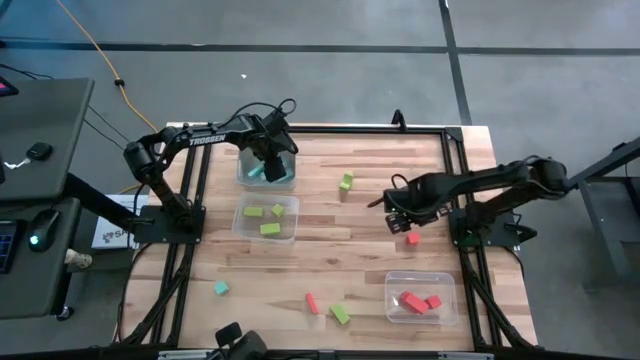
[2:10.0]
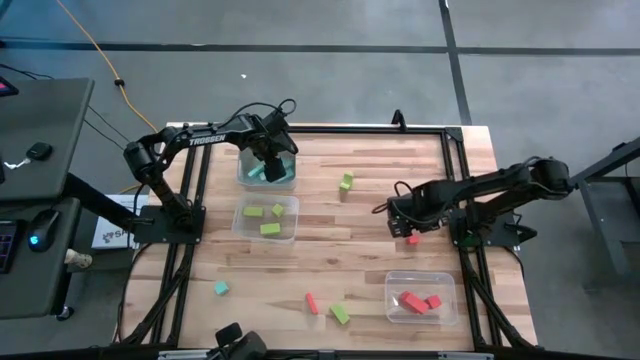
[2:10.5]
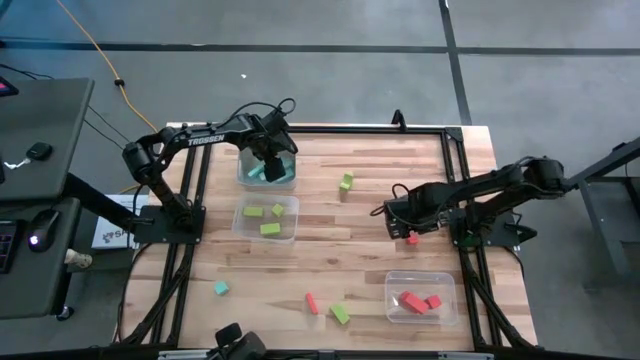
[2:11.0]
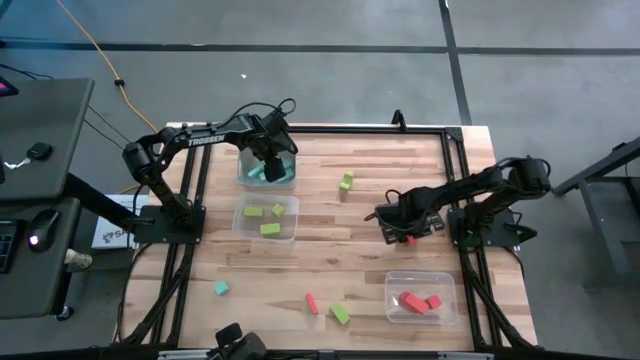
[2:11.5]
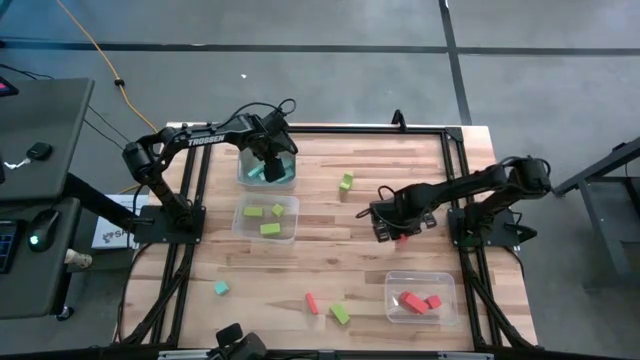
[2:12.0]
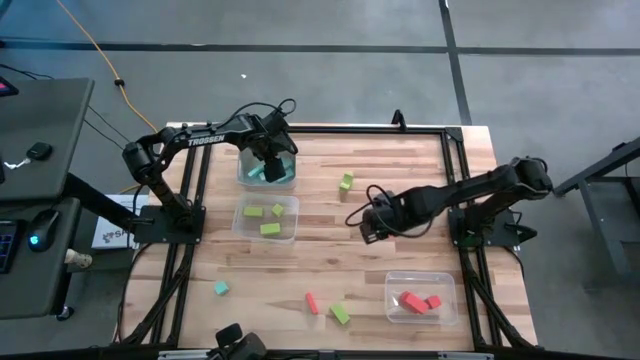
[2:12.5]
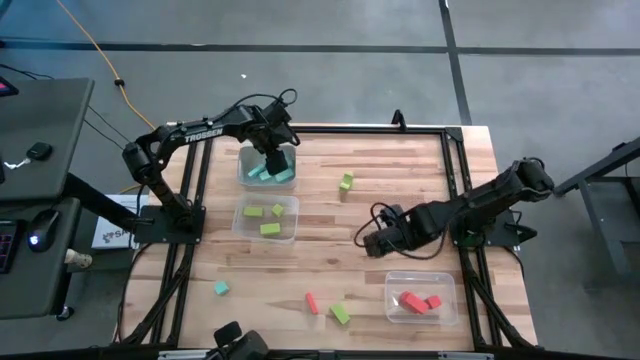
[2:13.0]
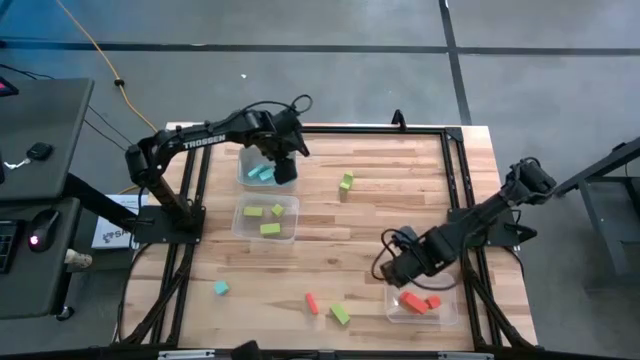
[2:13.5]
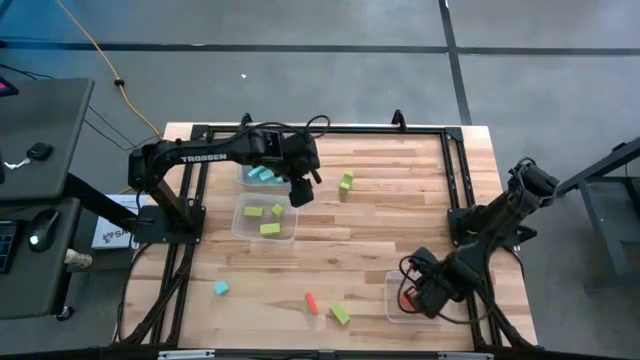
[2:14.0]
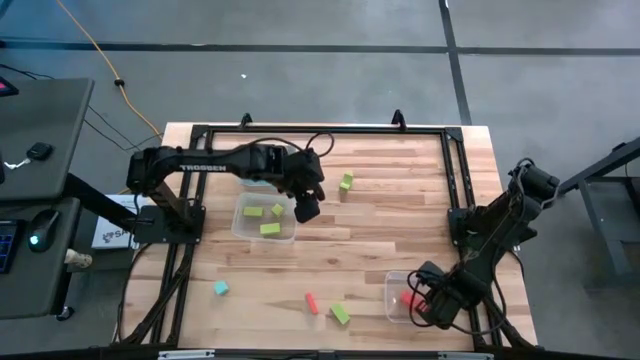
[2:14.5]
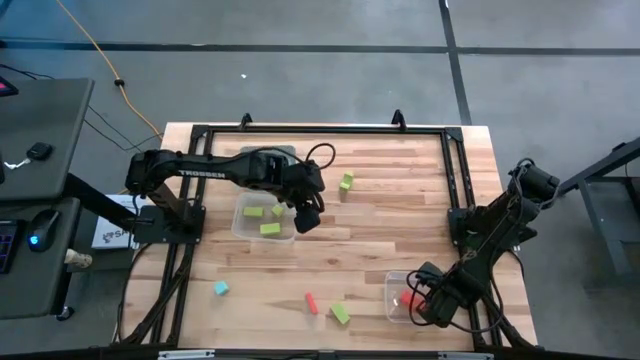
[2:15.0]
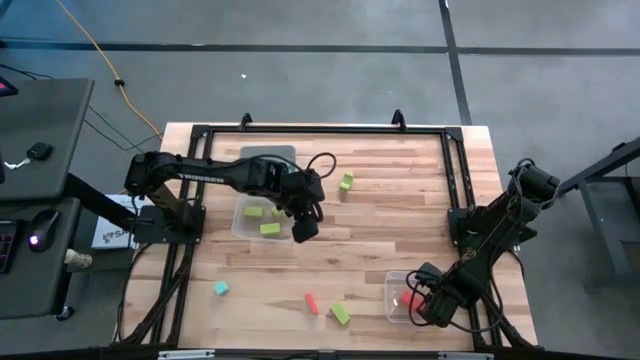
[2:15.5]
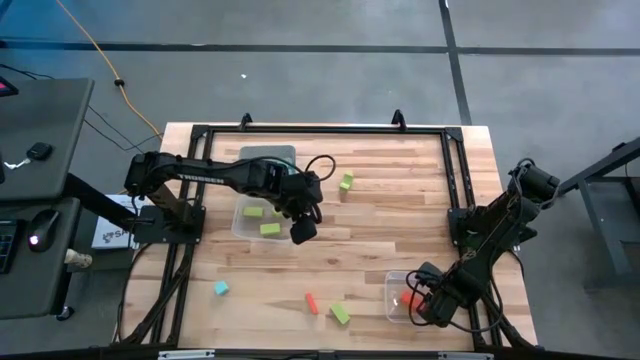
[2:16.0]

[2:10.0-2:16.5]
Task: Sort & place blocks by color
Put the orange block into the right transparent bin

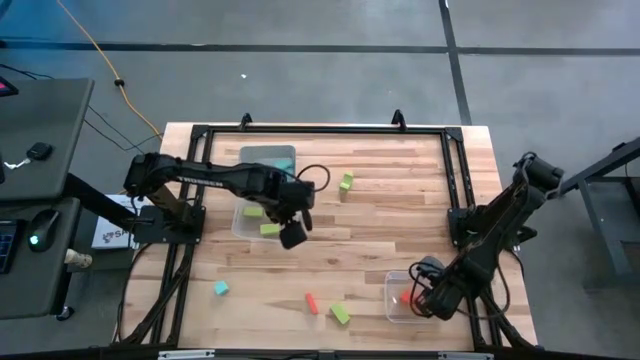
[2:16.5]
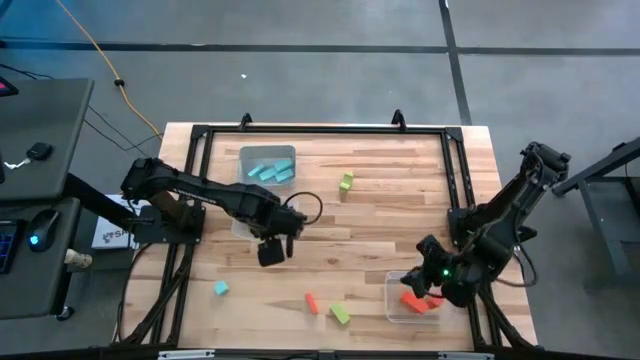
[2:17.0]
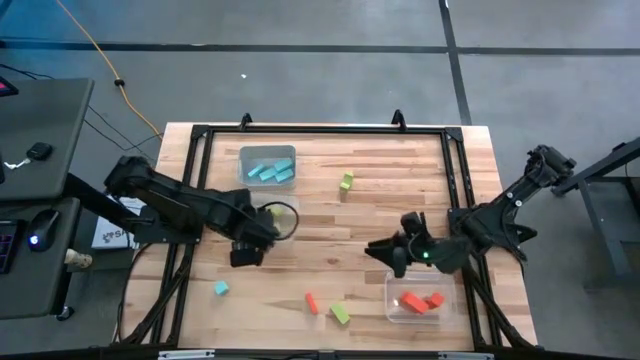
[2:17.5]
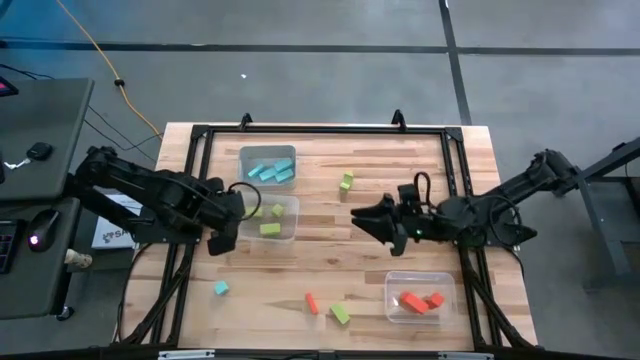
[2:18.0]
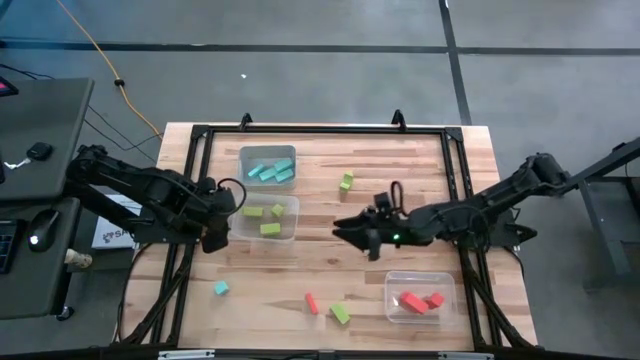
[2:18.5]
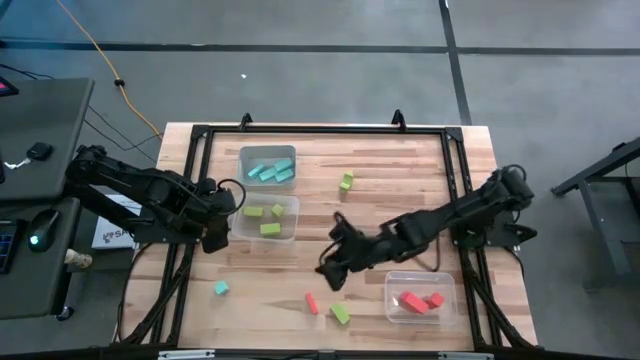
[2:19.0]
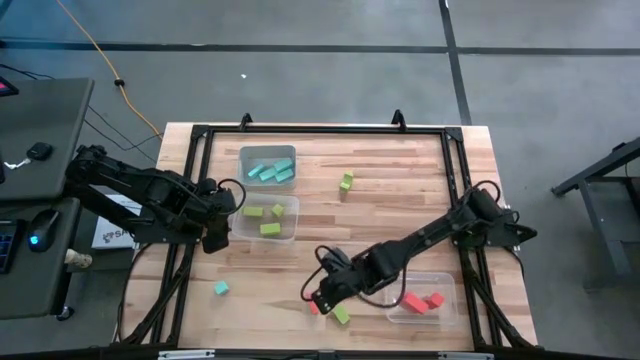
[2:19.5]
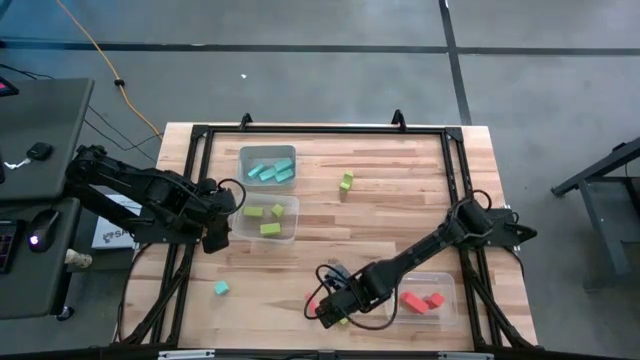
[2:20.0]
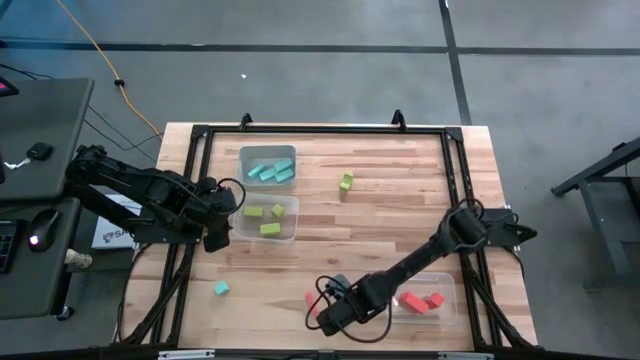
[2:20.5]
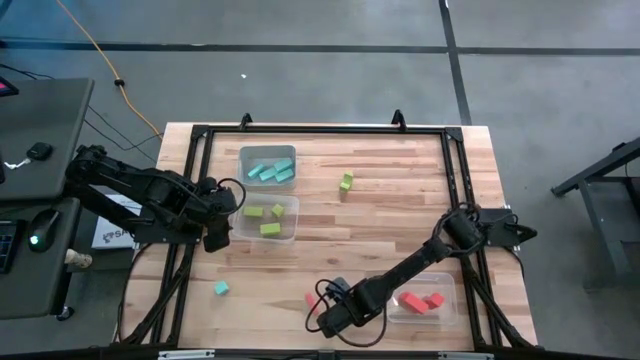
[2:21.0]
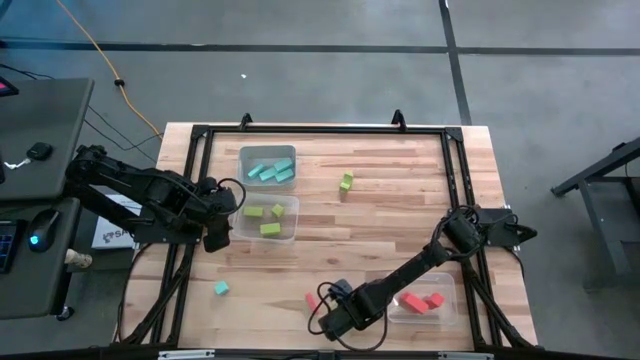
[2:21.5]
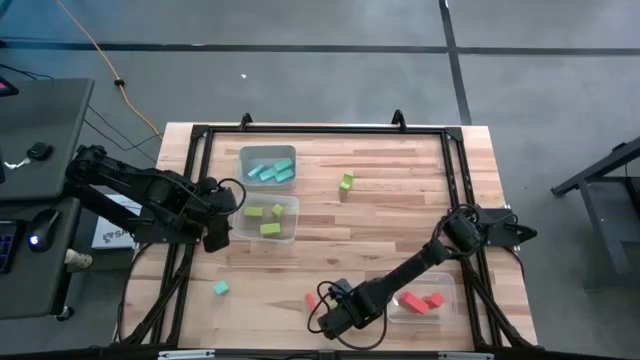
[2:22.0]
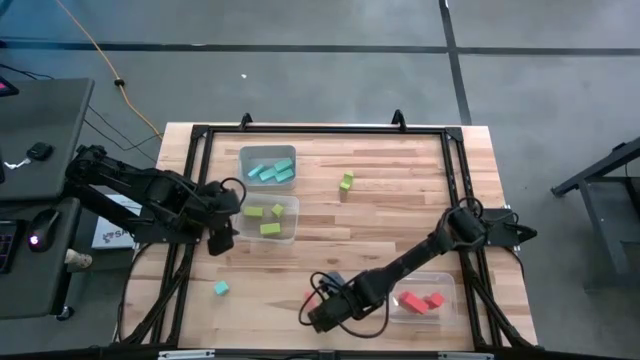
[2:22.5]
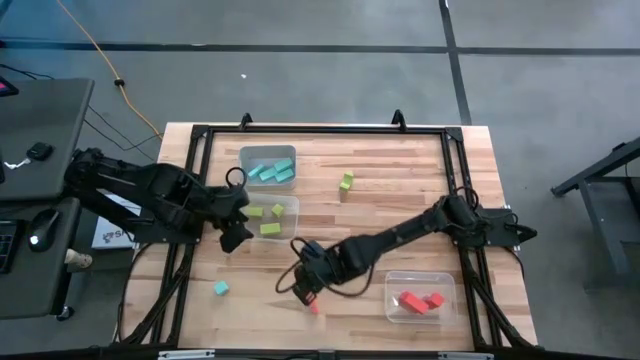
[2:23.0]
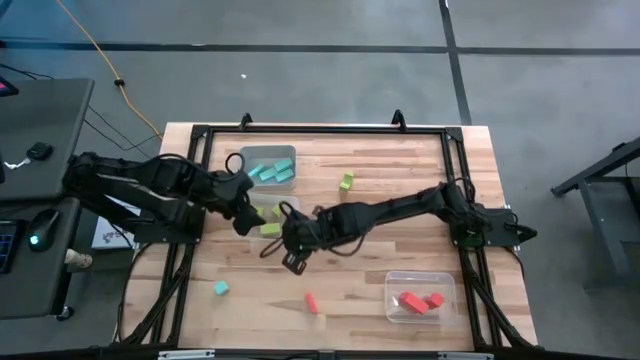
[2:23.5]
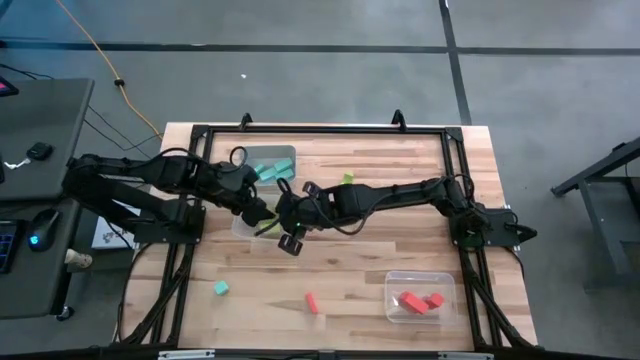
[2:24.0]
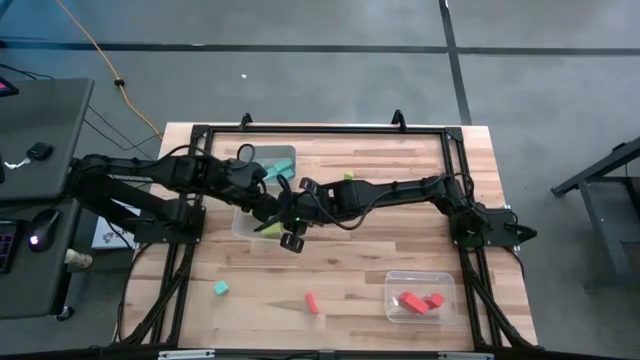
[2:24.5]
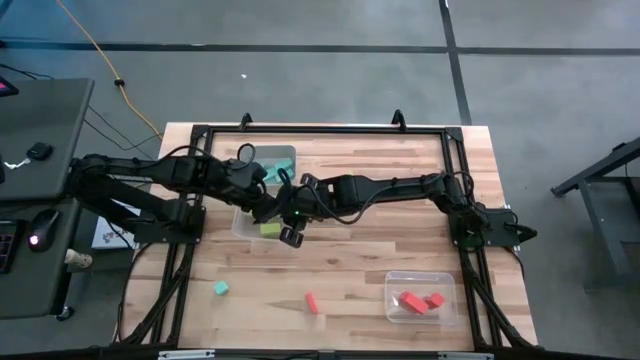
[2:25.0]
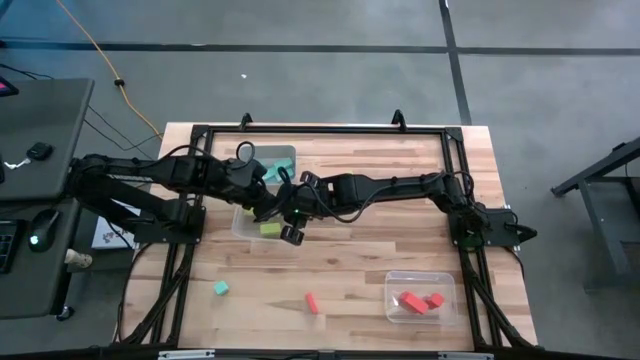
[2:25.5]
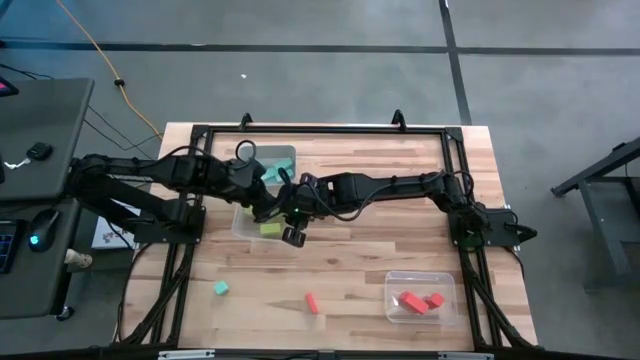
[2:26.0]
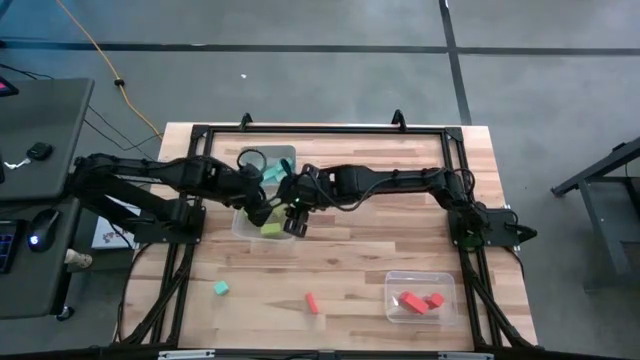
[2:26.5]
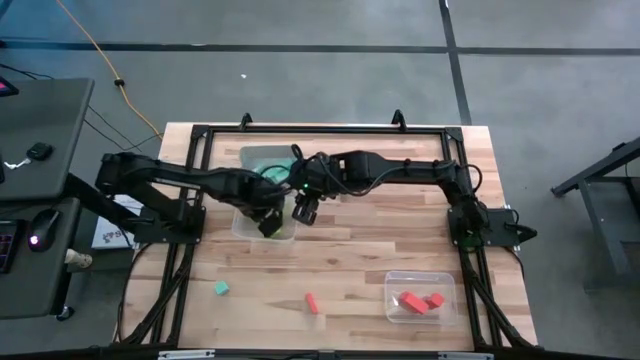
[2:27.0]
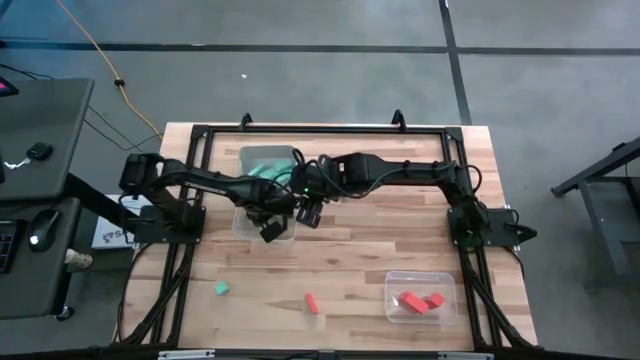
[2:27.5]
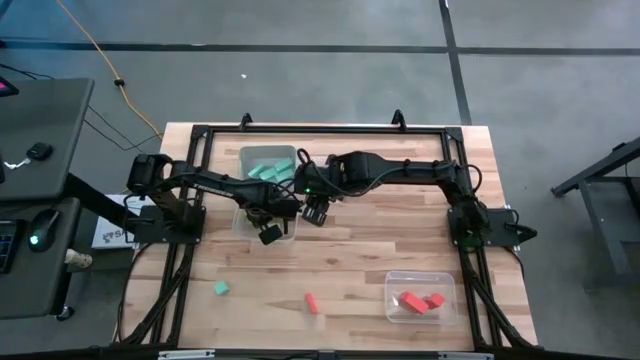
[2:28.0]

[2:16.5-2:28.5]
Put the green block into the left transparent bin

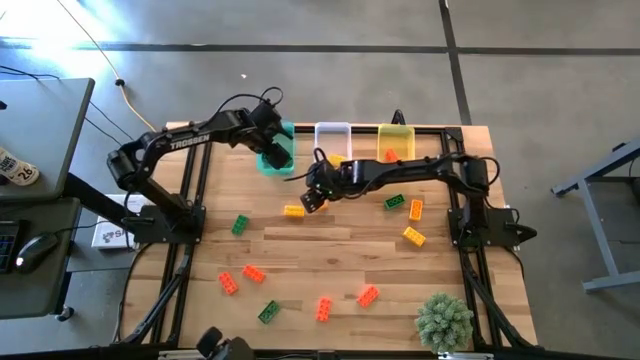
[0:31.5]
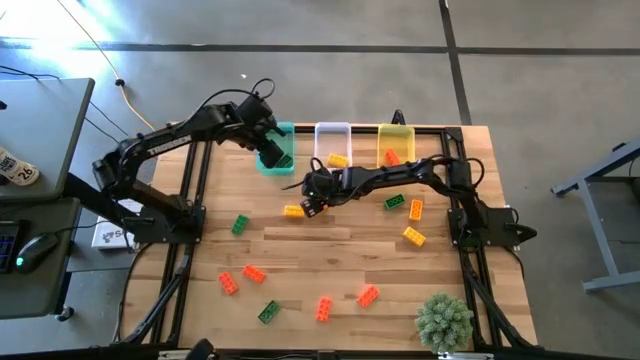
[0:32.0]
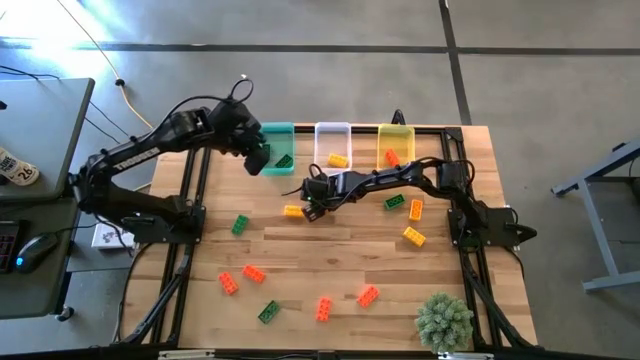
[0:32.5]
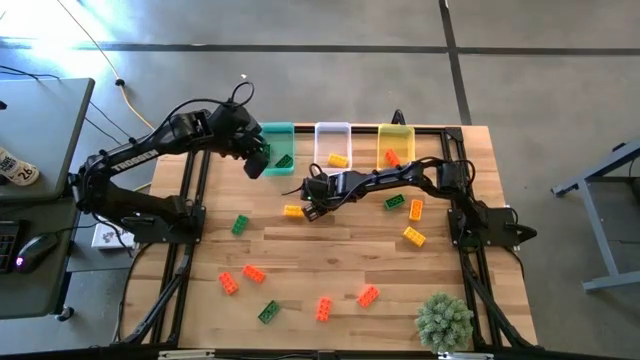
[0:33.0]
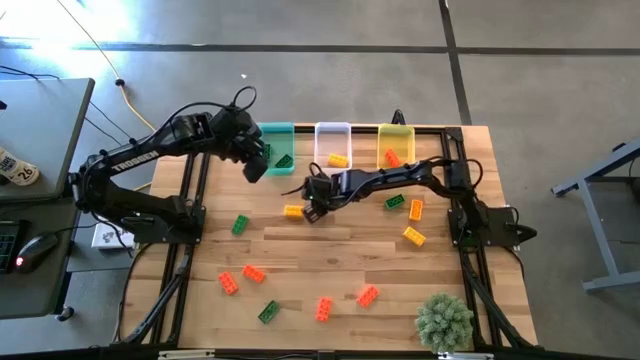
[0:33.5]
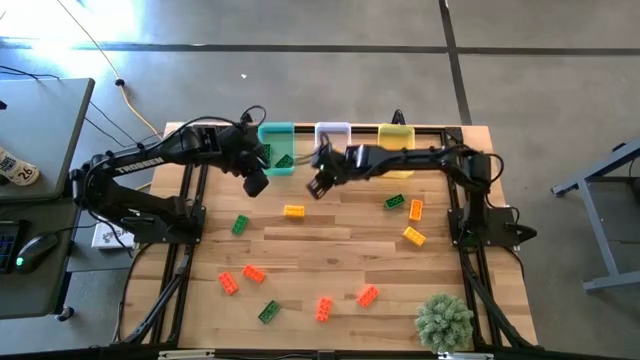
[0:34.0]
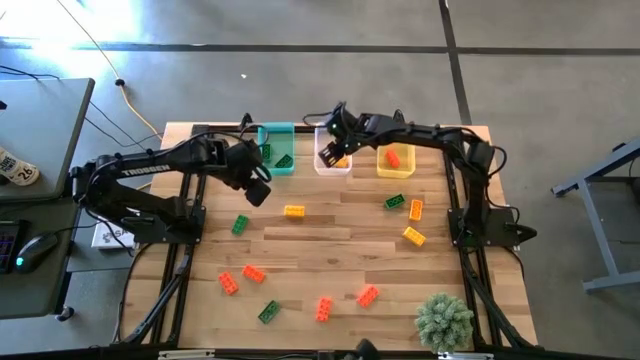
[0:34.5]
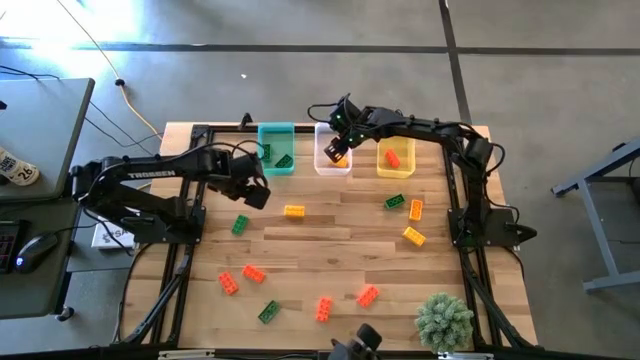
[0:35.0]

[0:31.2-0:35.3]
Task: Sort & place blocks by color
Put the yellow game piece into the white bin
